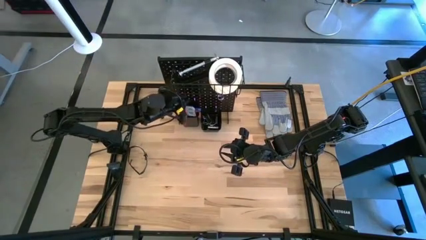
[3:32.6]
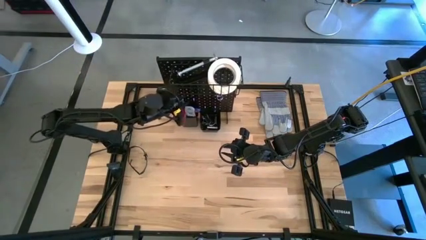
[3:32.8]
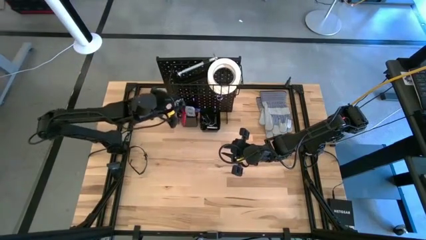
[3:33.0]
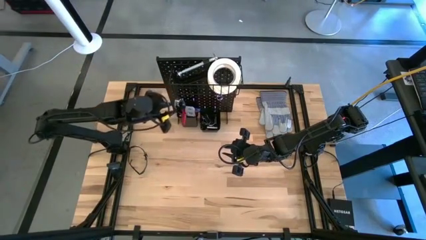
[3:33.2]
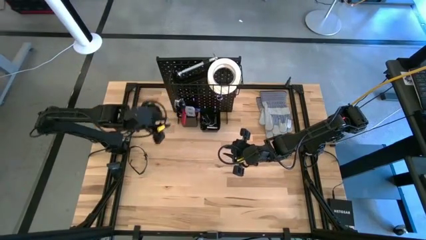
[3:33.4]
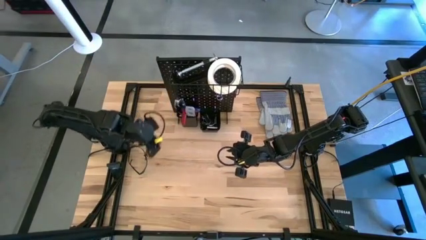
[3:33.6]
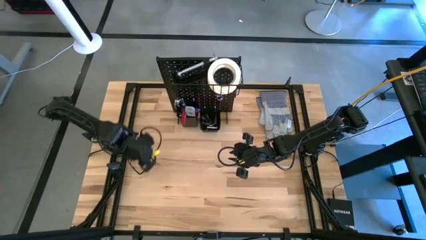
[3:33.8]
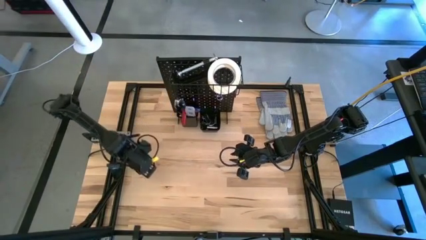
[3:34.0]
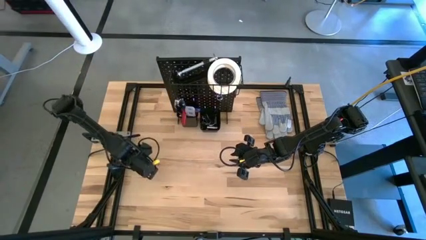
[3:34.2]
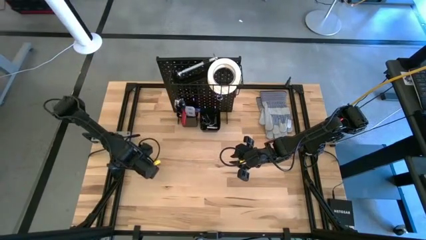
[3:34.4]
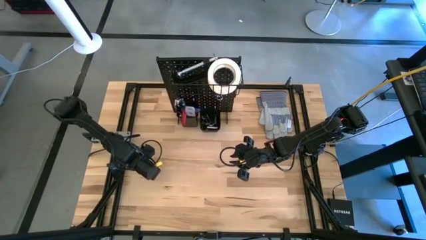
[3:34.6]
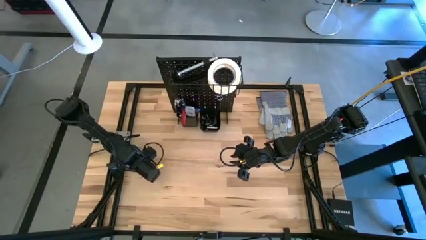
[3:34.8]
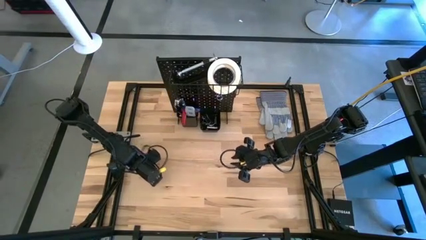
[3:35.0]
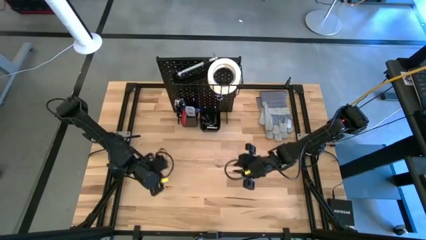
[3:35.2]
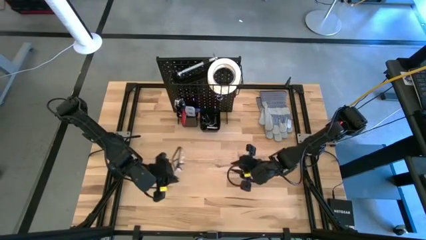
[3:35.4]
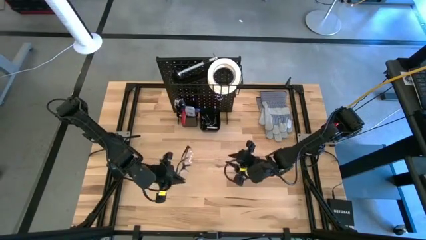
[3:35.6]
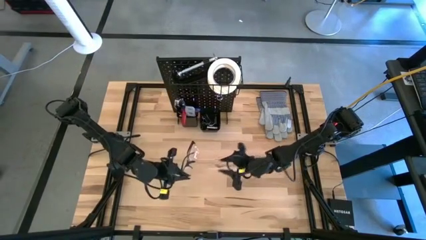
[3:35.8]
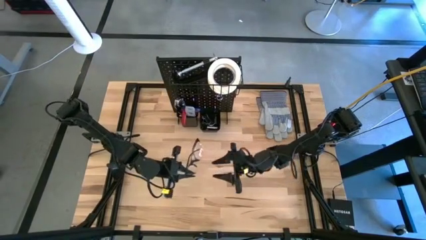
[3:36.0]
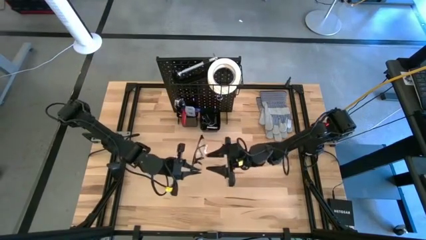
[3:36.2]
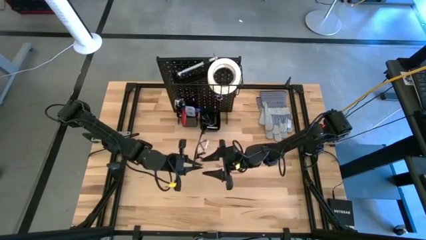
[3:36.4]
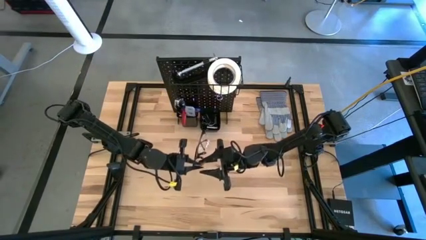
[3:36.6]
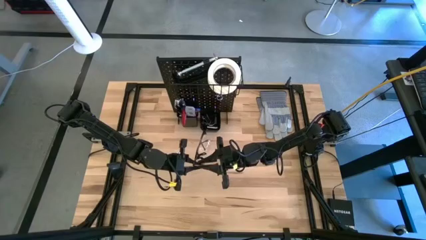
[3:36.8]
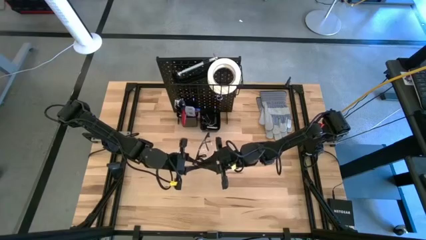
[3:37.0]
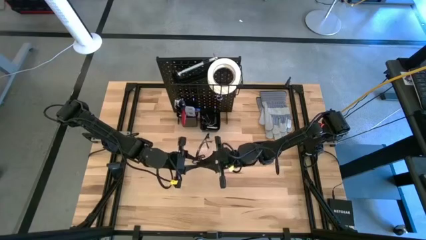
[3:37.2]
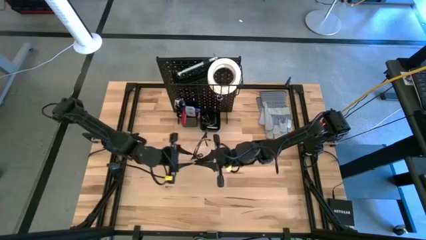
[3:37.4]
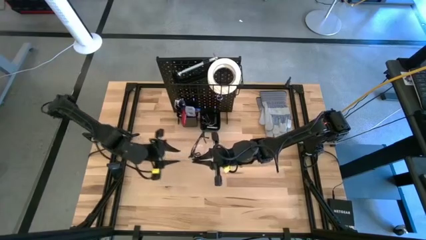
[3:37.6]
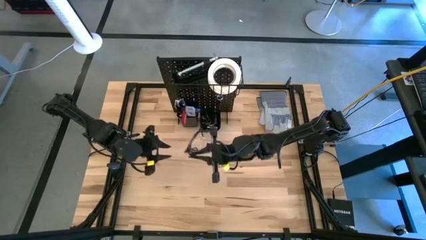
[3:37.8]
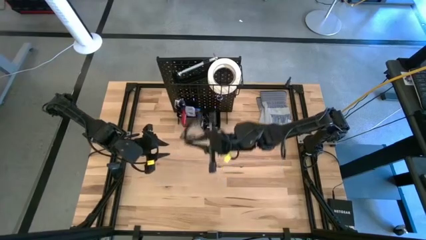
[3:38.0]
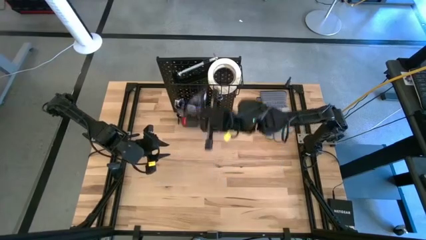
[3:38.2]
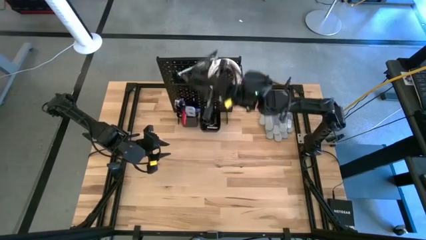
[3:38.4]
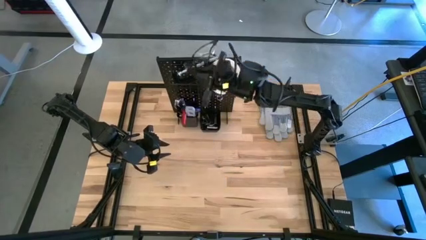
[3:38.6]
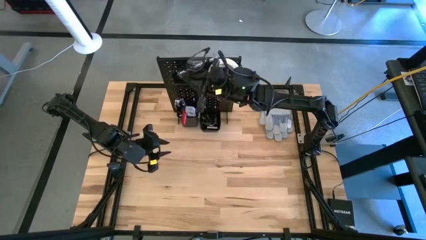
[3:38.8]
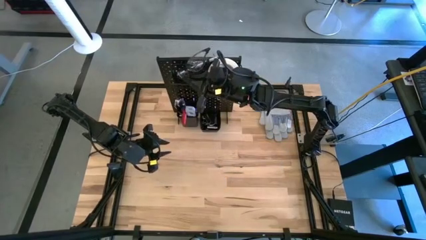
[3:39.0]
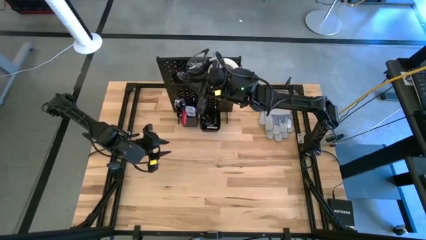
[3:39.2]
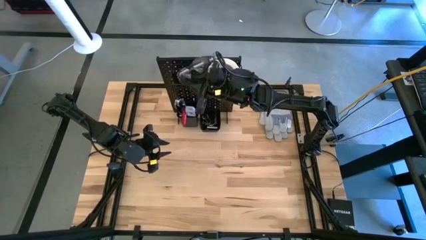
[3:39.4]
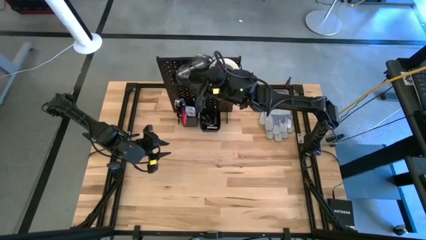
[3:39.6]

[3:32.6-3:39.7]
Task: Hang tools onto peg board
Put the safety glasses into the wire basket on the pegboard

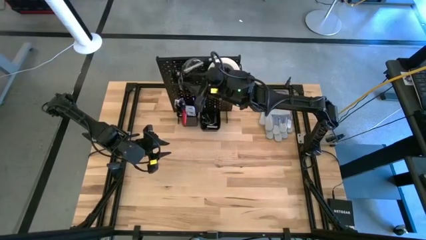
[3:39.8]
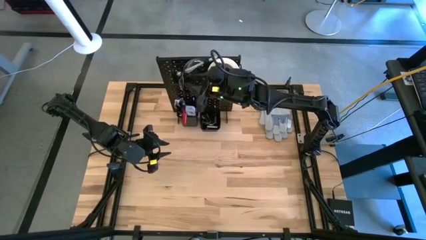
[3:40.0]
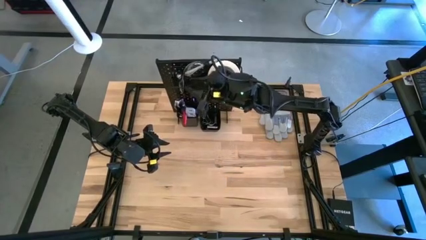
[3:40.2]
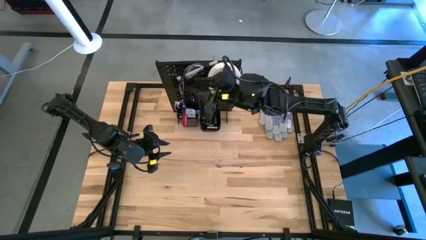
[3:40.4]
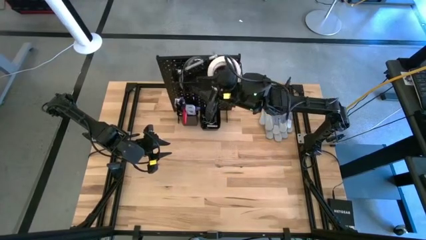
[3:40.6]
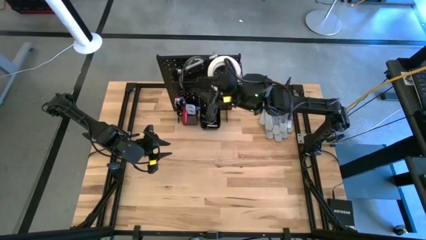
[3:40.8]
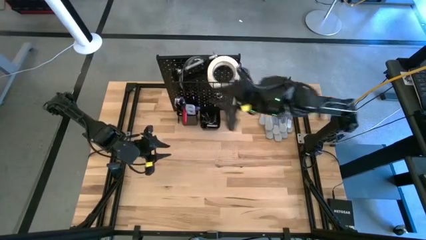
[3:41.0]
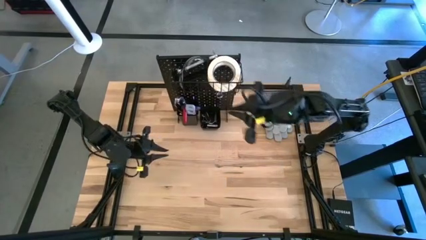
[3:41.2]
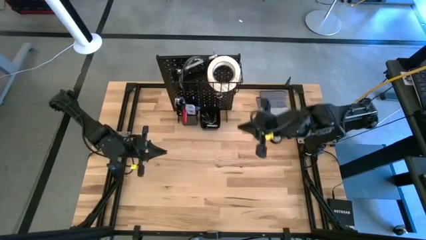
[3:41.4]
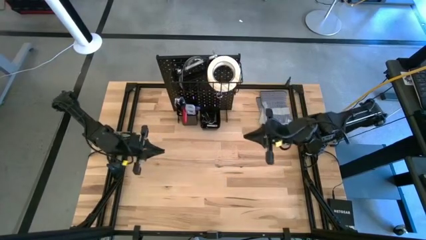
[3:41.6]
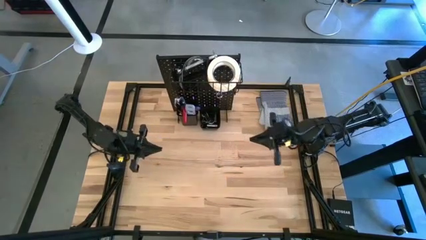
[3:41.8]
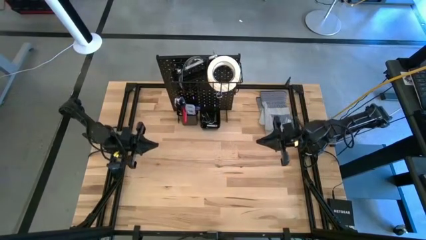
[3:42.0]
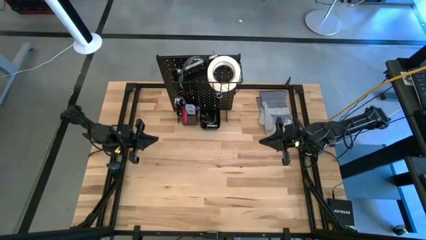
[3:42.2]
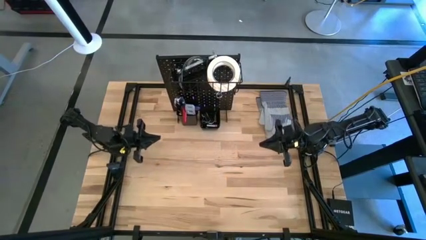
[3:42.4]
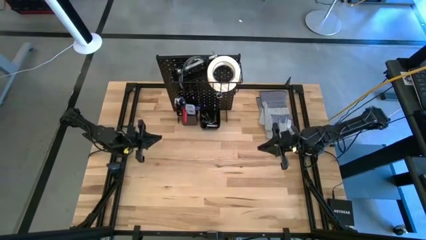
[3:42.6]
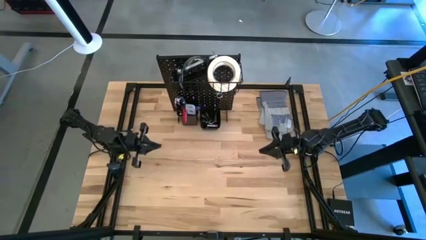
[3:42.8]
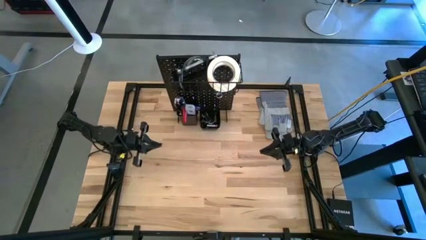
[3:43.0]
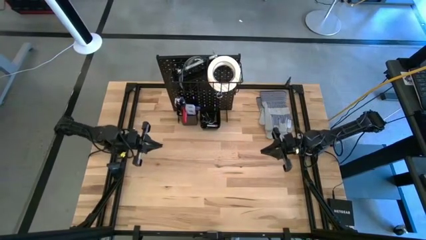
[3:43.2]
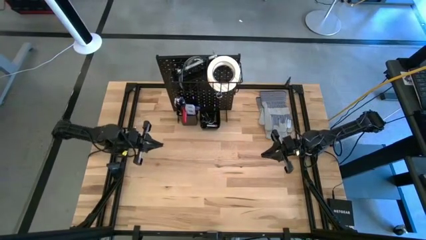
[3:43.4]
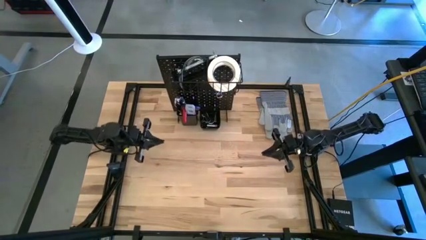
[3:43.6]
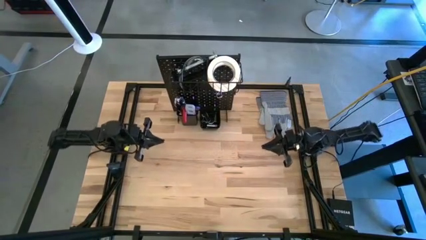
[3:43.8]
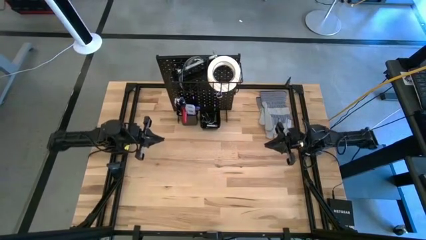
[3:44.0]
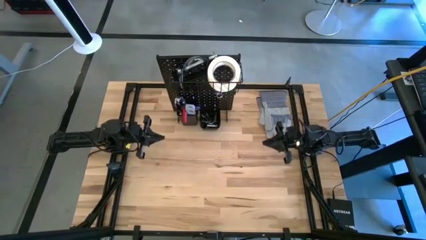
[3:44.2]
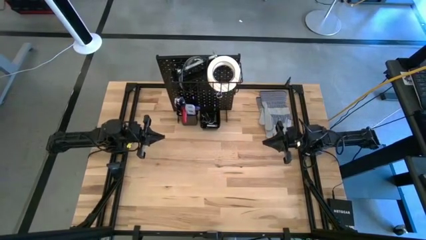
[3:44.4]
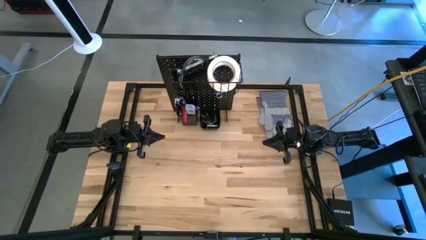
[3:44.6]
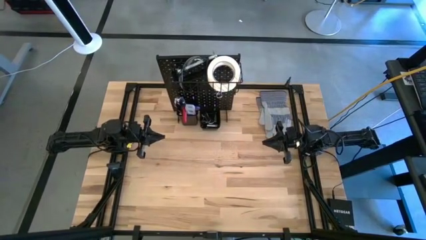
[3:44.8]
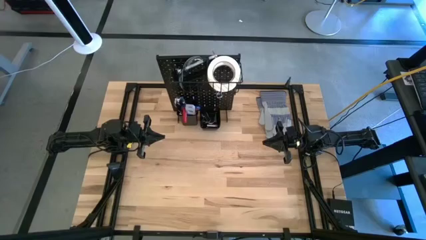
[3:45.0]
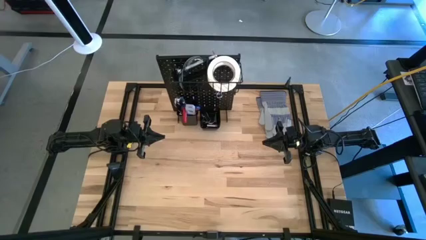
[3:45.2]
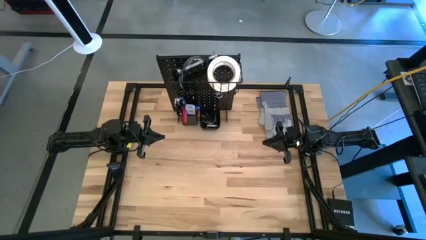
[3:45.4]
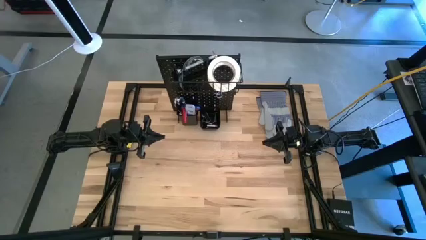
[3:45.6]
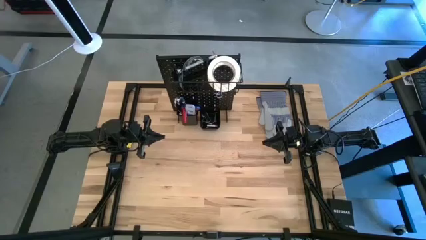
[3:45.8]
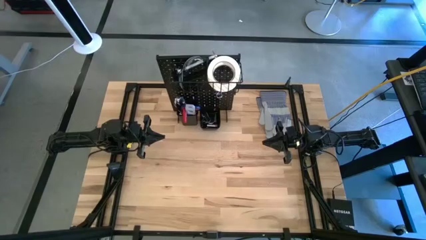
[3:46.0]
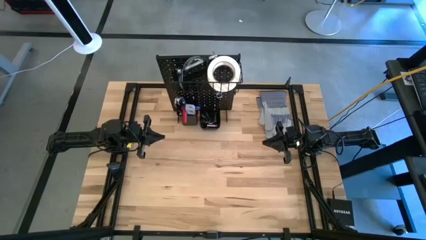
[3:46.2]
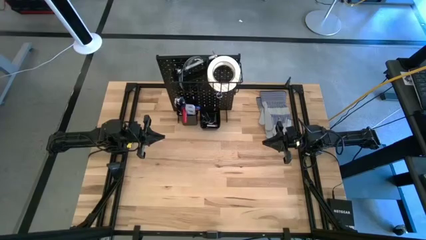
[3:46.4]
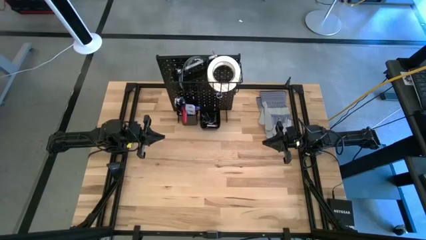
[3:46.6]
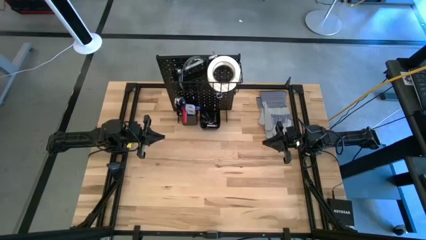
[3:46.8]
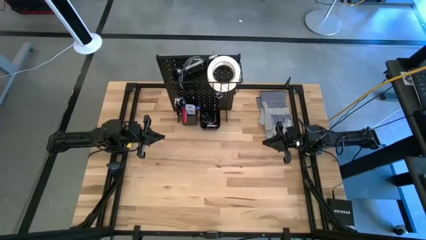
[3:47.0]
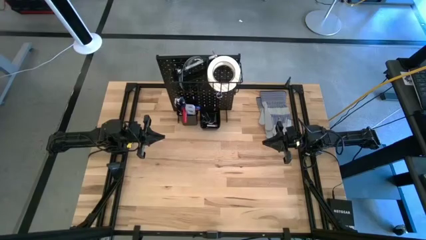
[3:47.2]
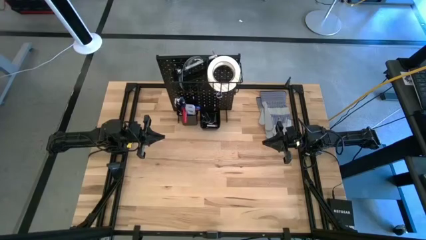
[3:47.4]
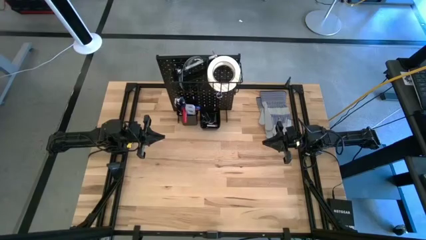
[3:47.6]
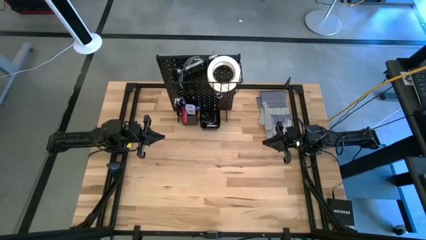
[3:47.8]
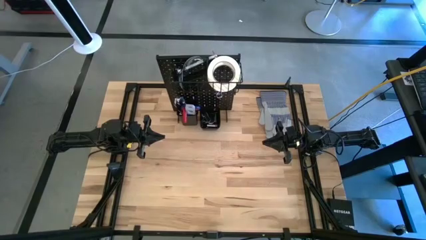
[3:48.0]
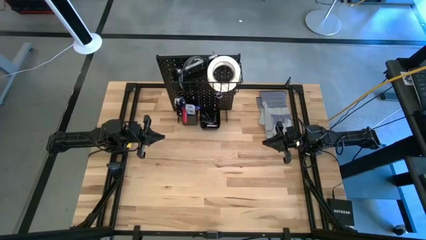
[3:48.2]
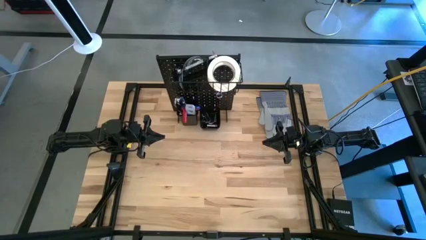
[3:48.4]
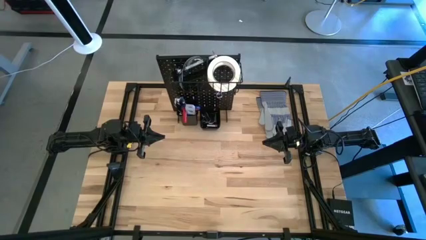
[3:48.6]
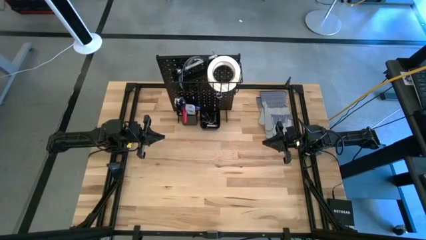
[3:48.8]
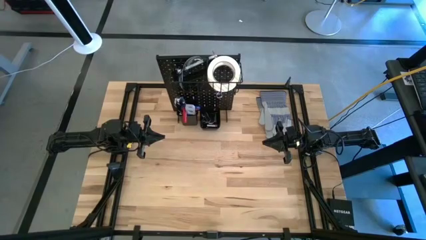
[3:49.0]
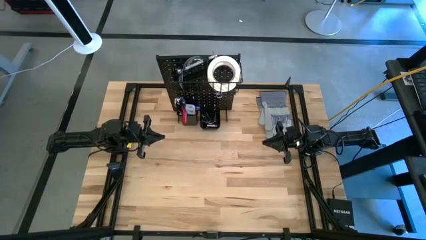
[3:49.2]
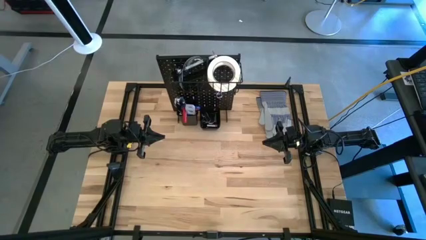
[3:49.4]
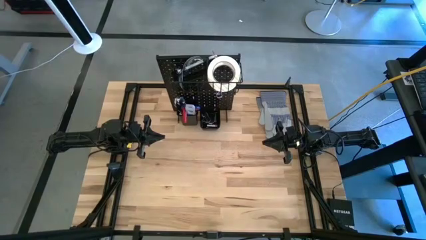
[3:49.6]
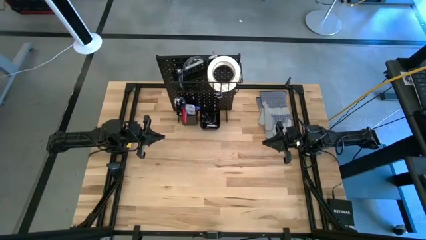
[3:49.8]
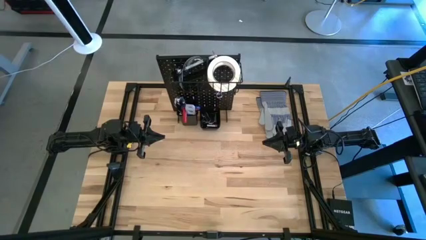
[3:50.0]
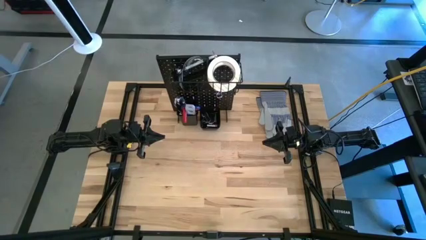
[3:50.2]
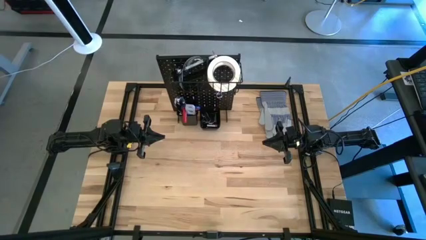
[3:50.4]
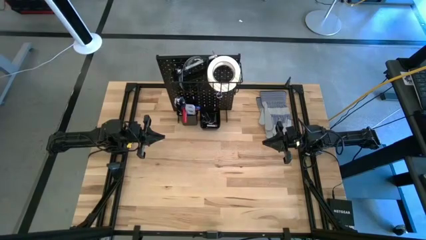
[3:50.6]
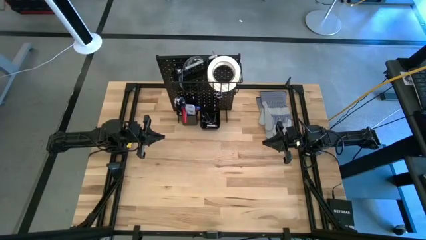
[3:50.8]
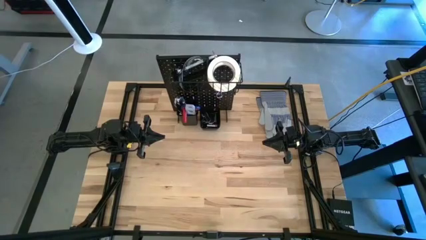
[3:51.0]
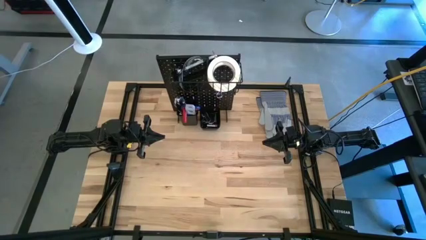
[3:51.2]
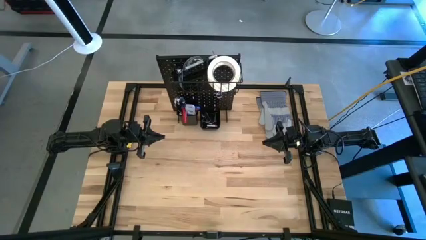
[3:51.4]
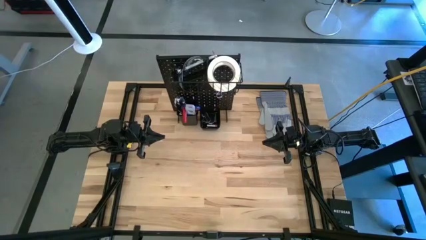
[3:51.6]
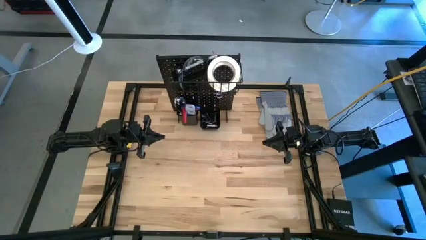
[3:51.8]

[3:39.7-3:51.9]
Return to Home Position
